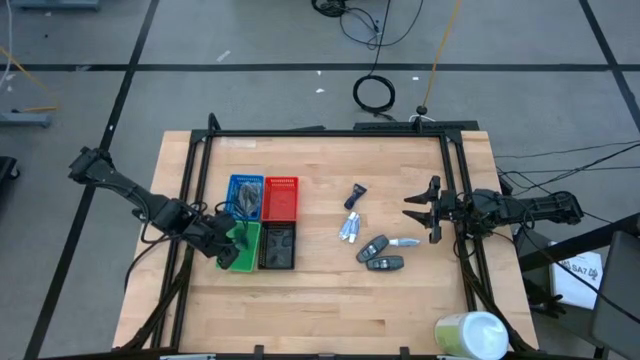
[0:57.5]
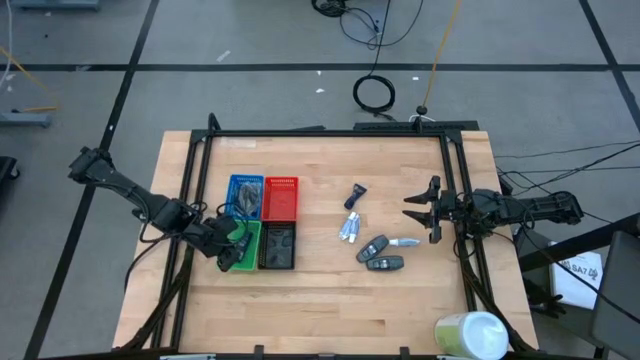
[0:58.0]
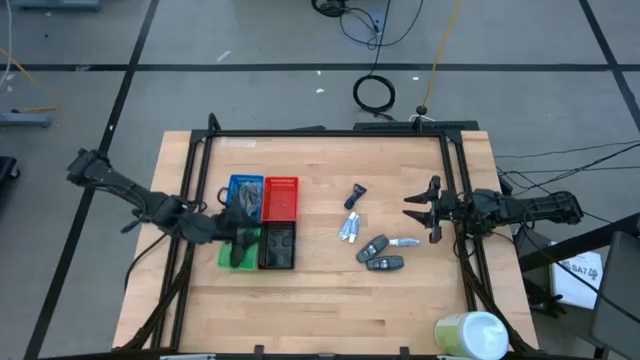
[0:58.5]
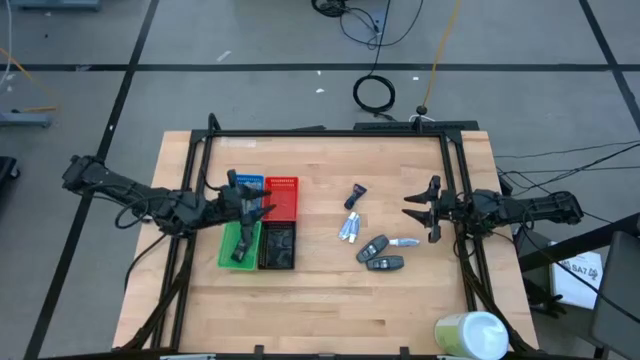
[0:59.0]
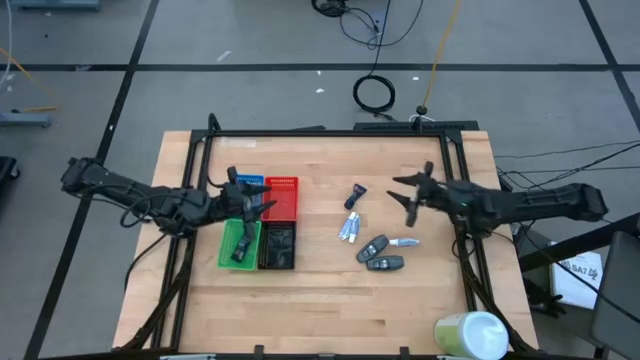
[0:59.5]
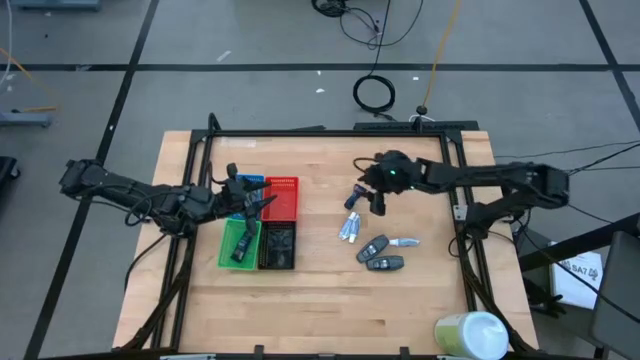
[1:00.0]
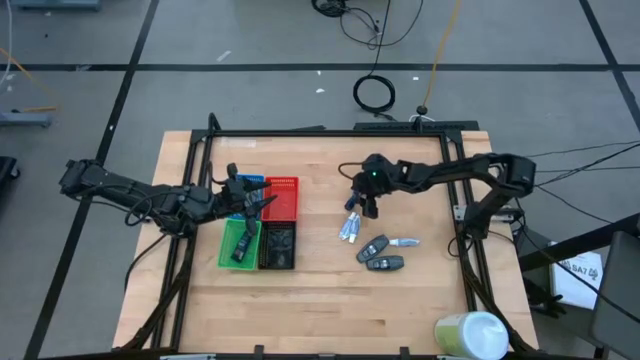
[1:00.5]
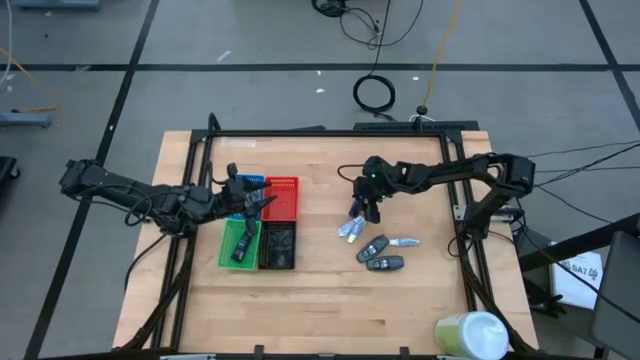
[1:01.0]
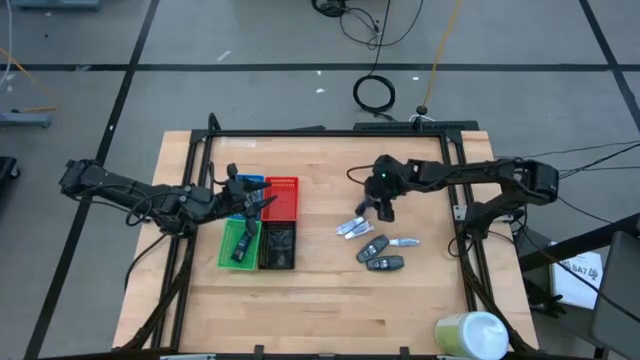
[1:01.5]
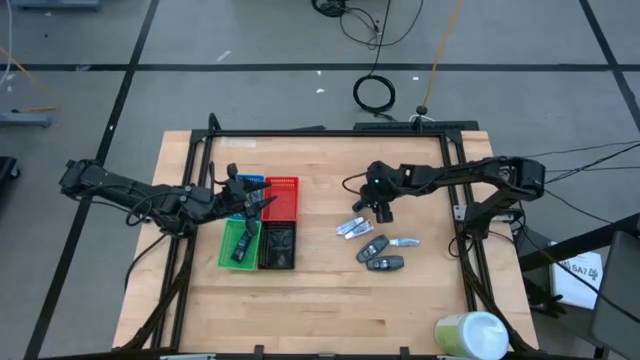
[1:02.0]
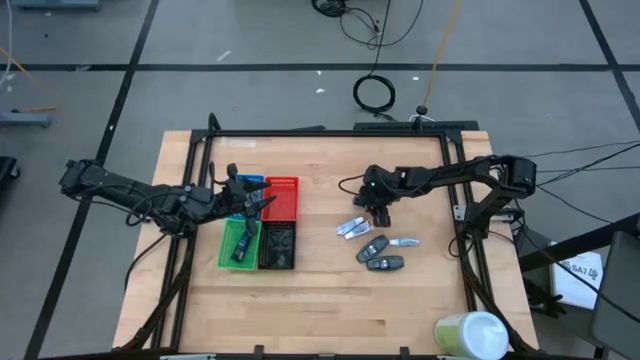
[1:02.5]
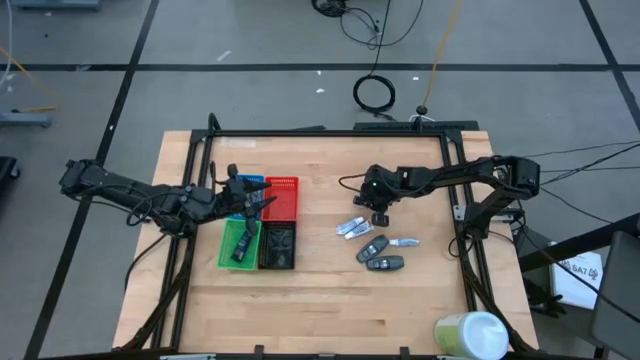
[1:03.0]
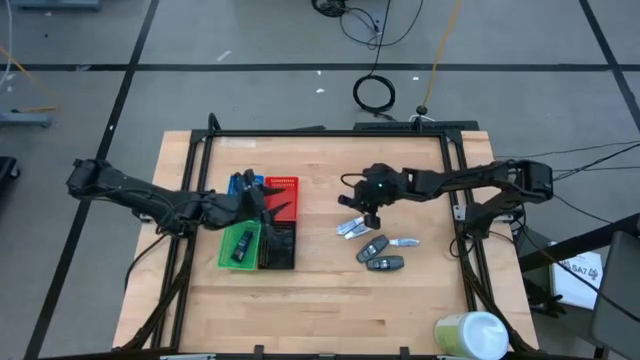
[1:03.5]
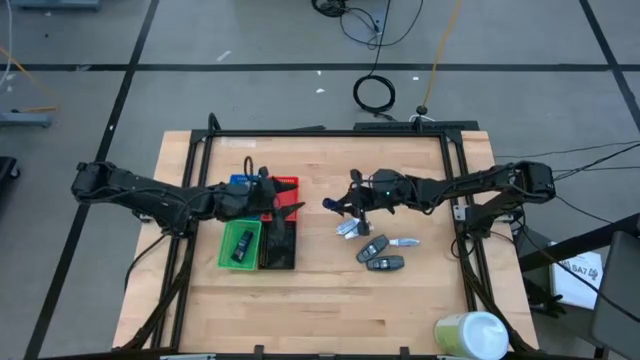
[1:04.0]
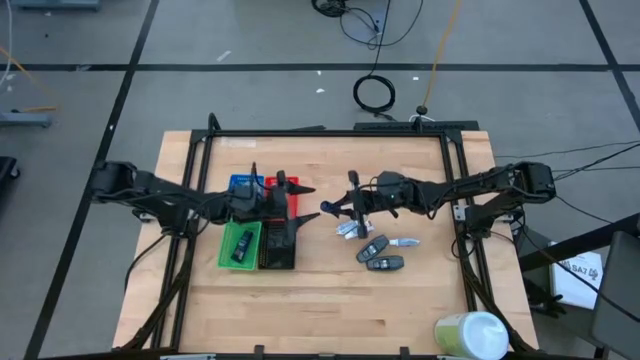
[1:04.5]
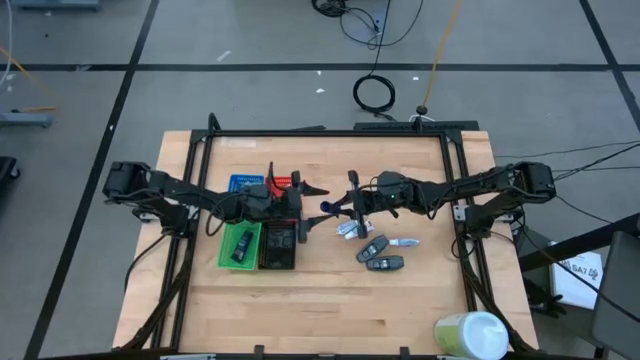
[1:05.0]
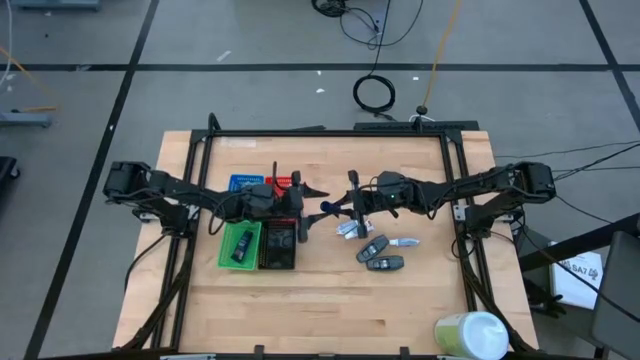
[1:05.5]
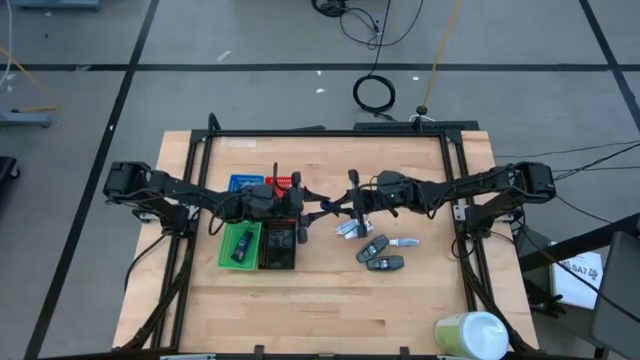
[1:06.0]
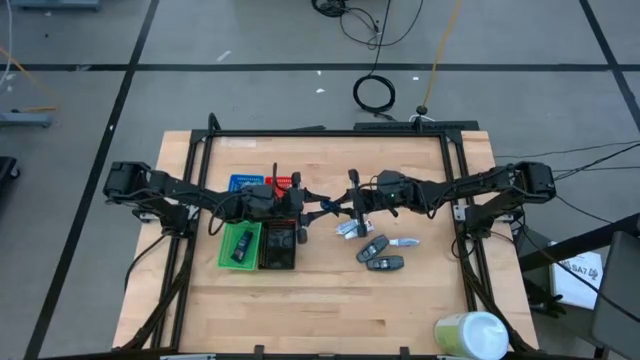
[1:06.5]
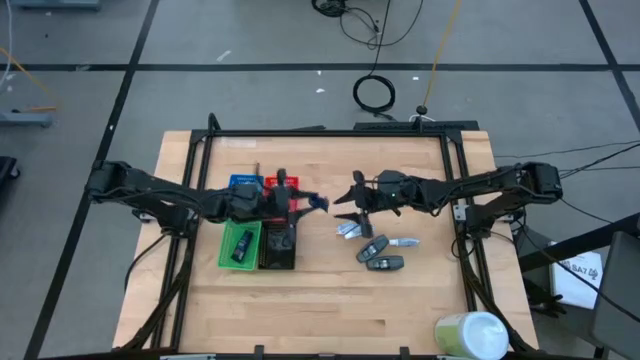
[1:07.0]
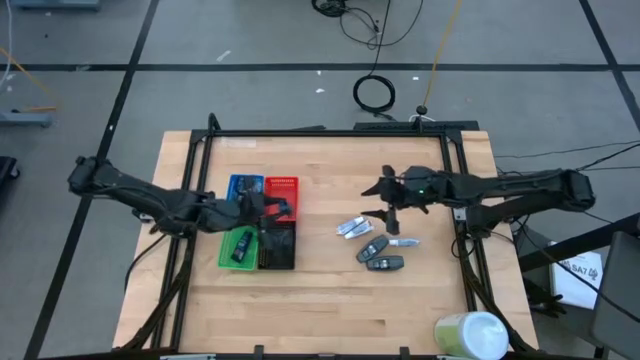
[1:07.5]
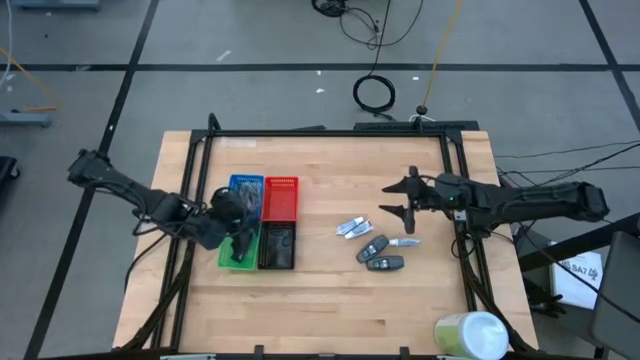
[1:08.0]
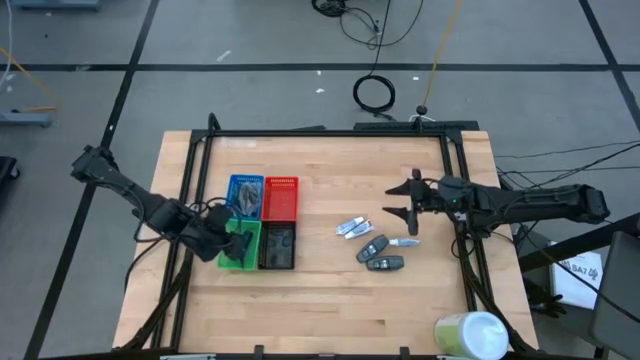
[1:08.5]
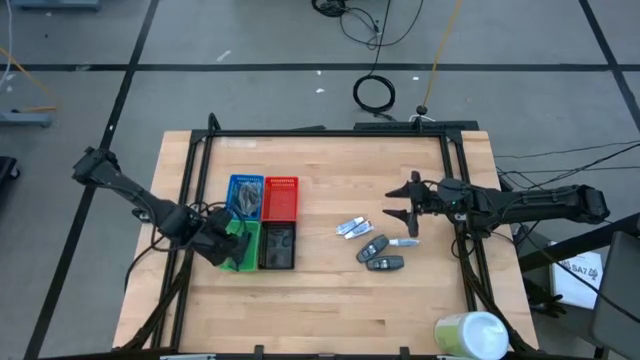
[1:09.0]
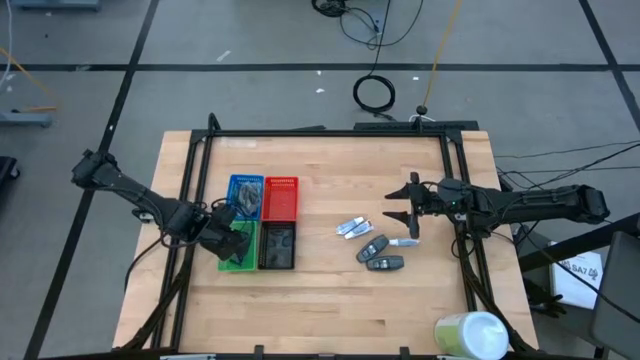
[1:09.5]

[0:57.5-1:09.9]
Task: Pick & Place Travel size toiletries
Put the blue shave cream into the green bin

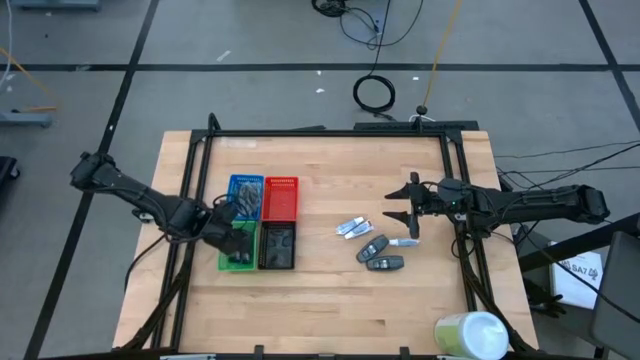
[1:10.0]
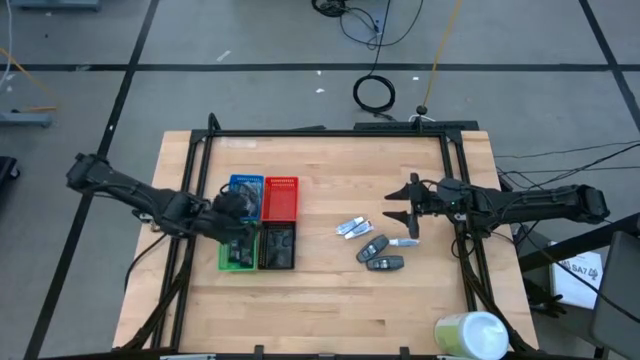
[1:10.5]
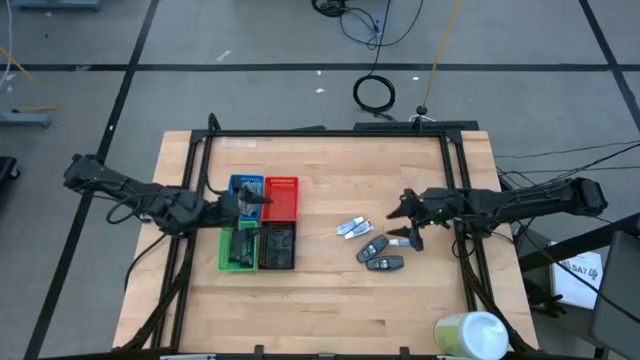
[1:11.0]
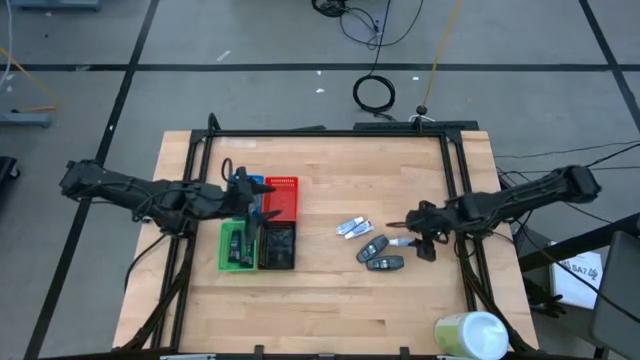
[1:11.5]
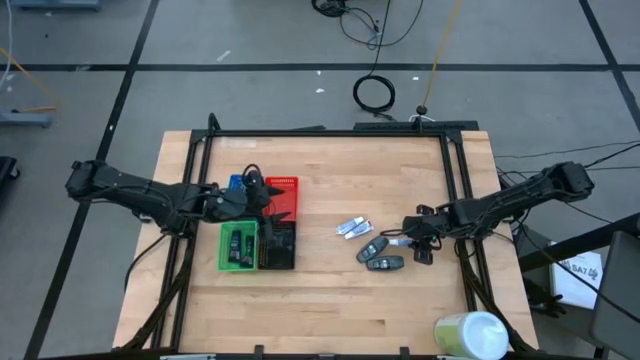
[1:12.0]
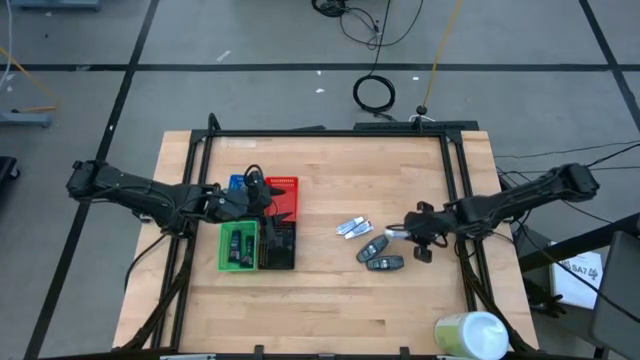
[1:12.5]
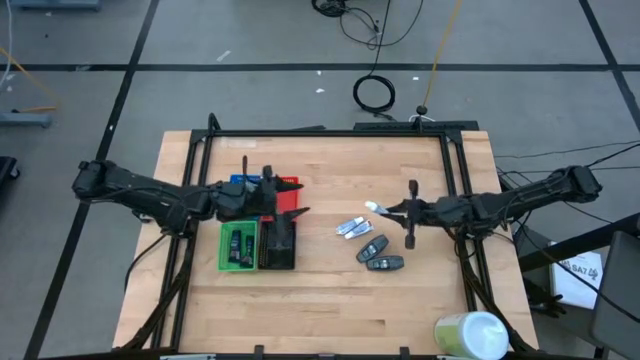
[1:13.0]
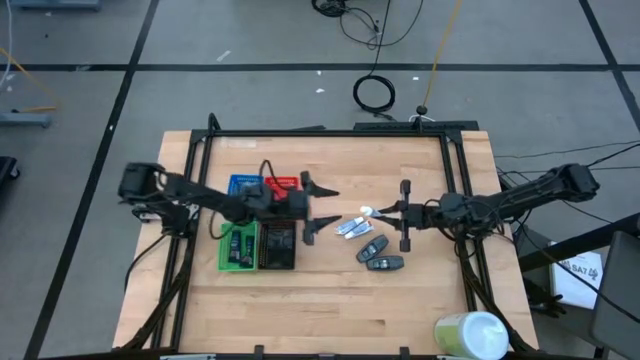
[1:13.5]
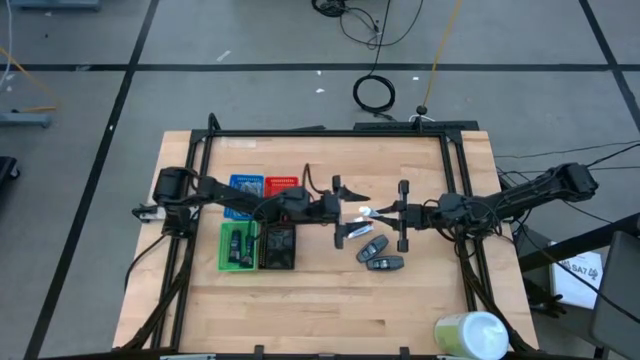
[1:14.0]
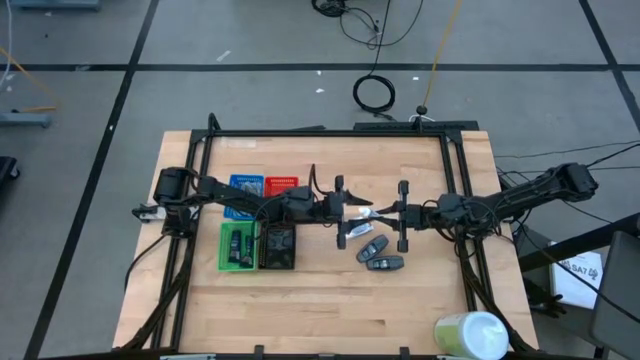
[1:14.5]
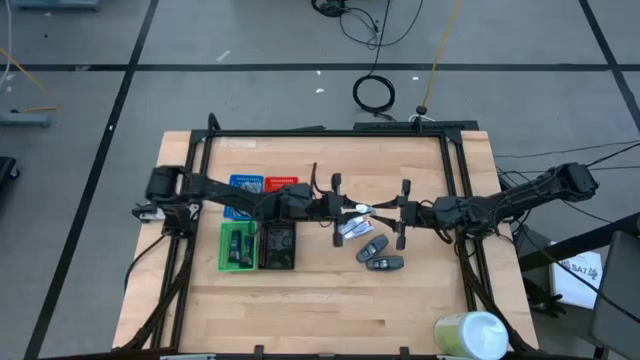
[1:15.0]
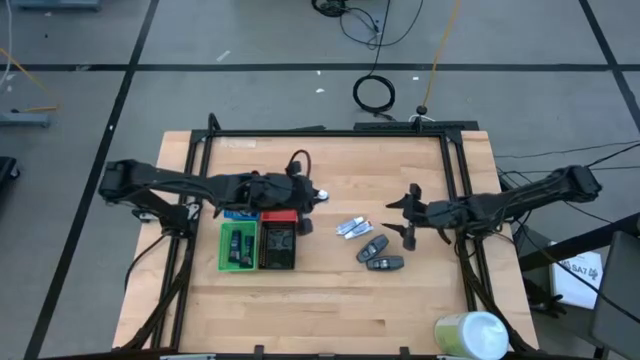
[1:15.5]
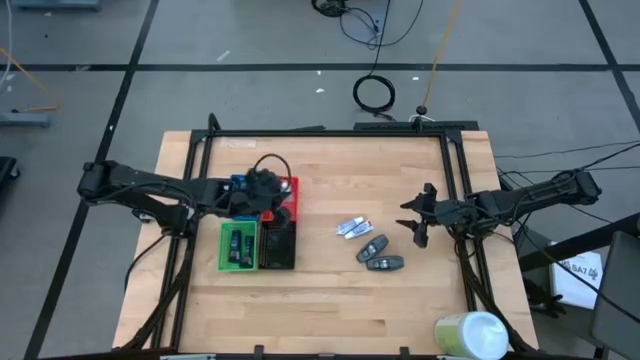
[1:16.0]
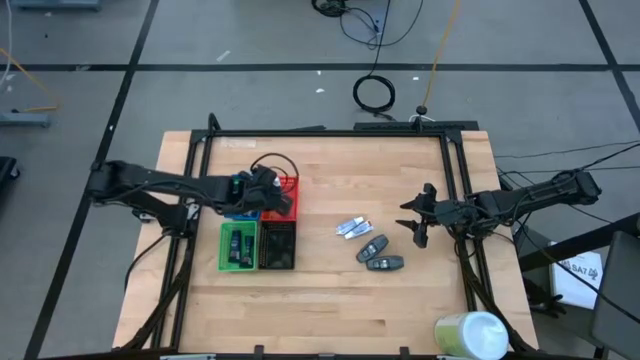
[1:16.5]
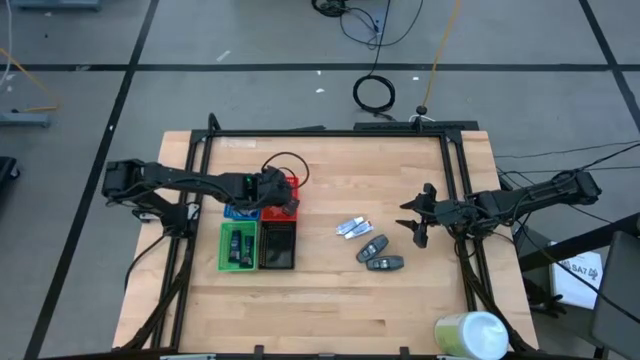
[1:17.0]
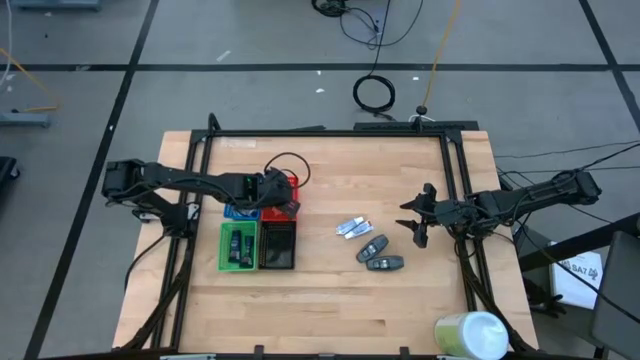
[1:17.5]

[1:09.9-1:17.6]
Put the right white toothpaste into the red bin

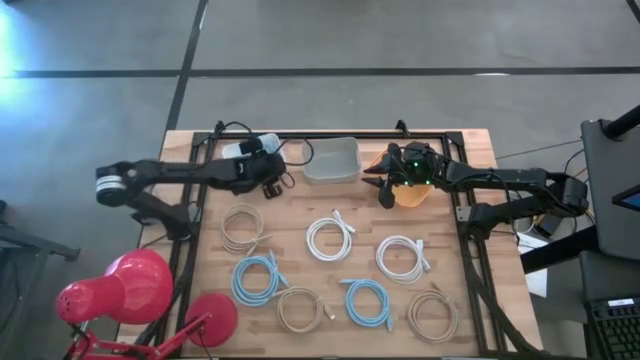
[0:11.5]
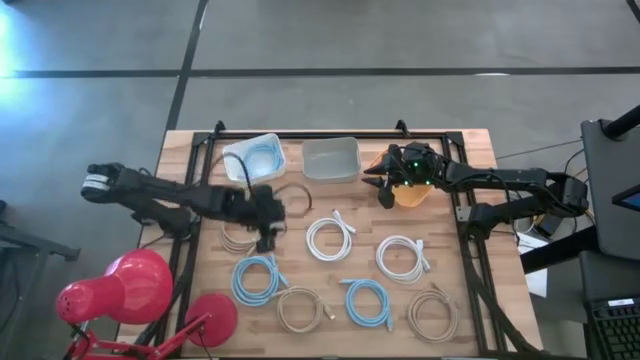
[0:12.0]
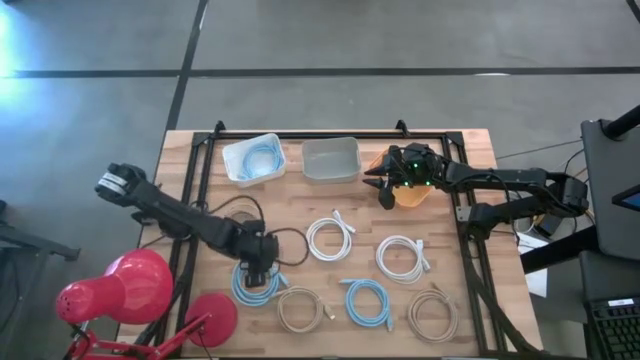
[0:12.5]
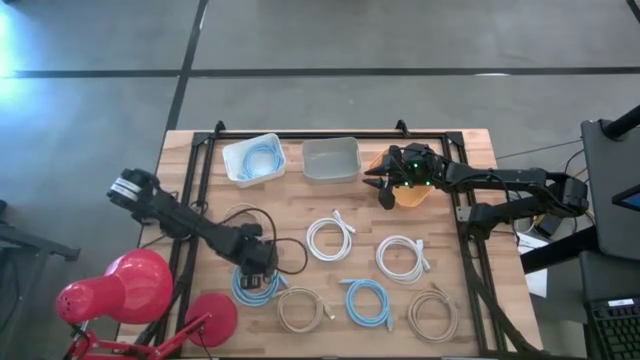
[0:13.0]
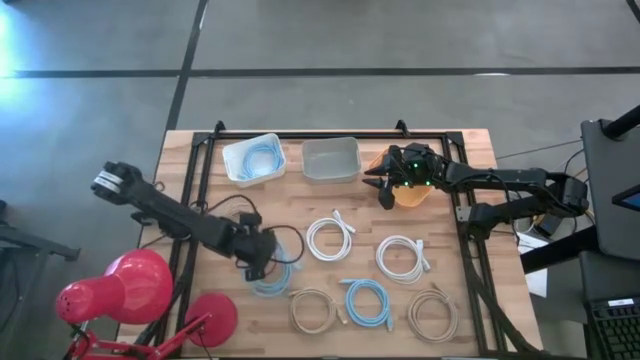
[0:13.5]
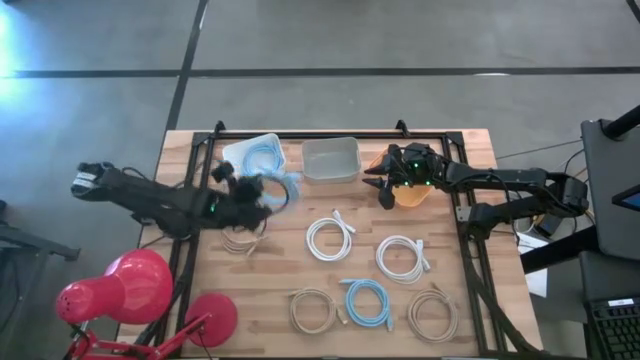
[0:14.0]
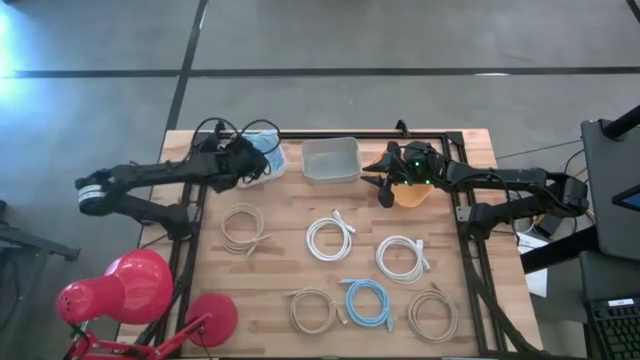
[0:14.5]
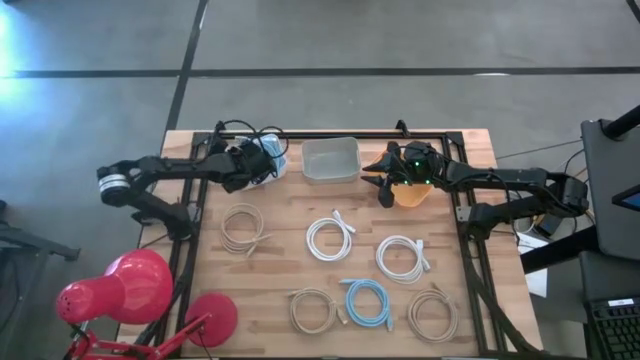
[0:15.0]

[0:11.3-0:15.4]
Task: Pick & Place USB Port
Put the left blue cable into the white bin
